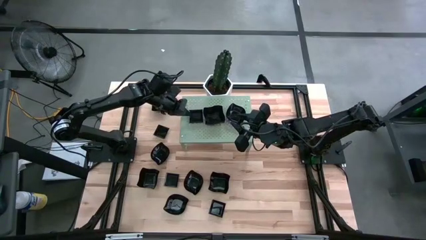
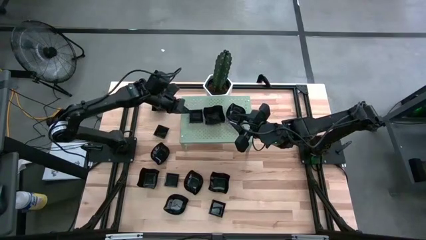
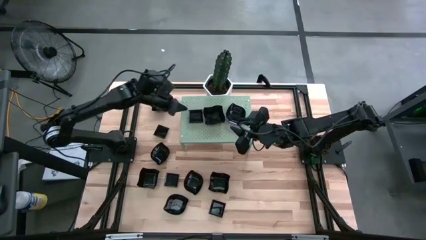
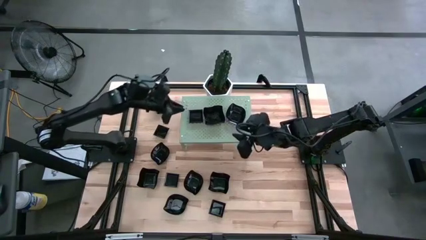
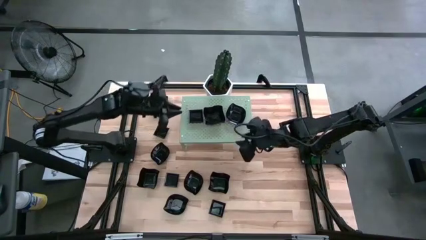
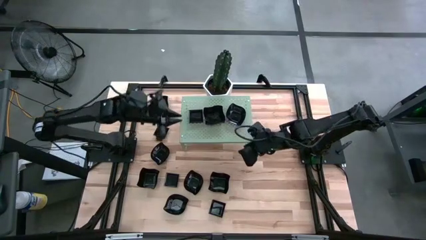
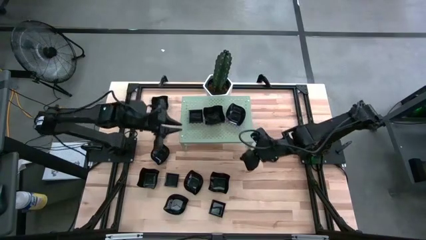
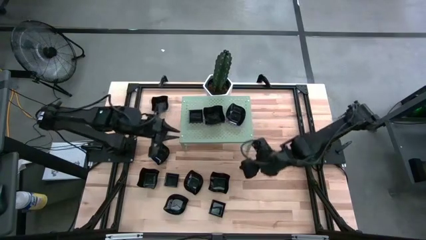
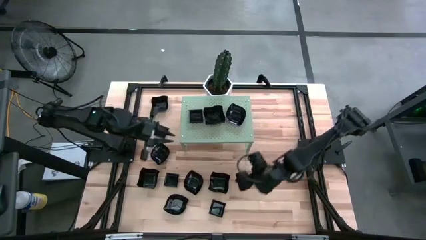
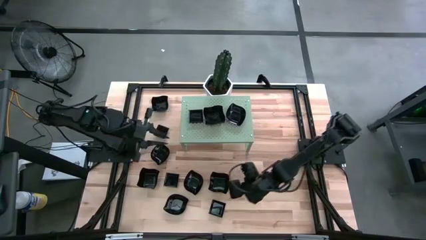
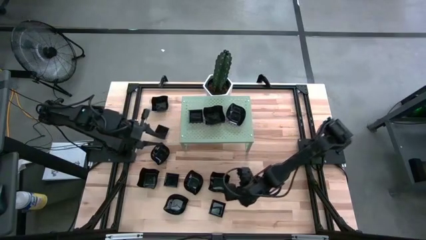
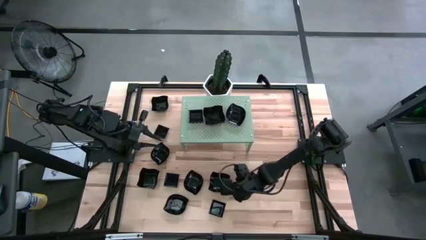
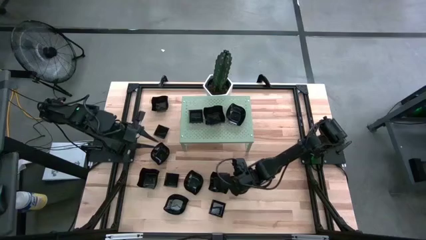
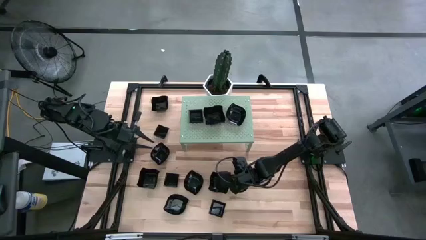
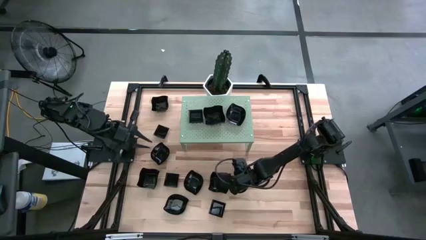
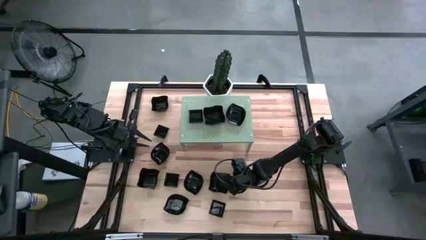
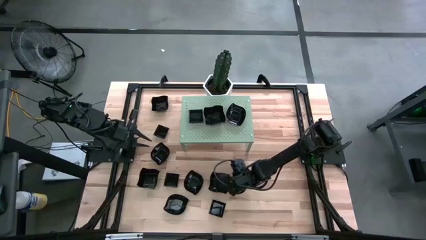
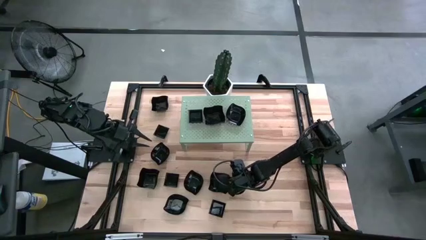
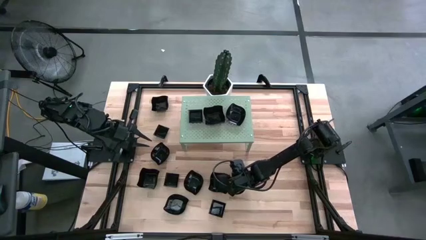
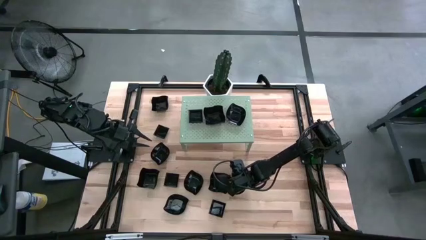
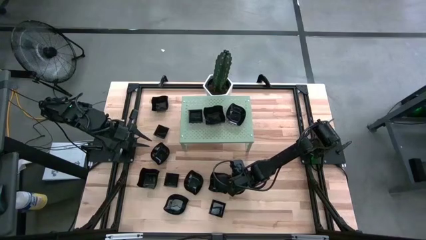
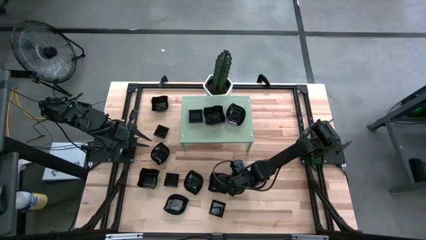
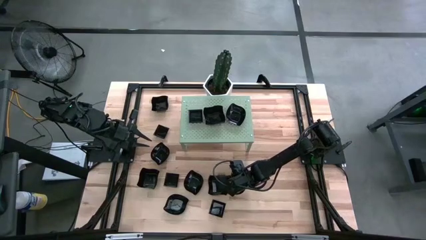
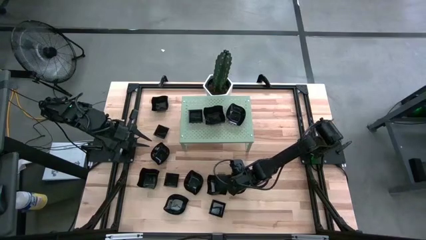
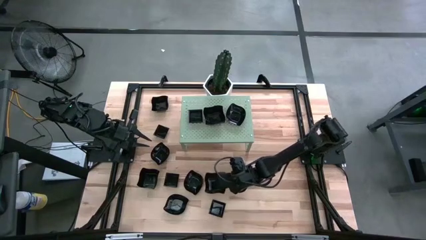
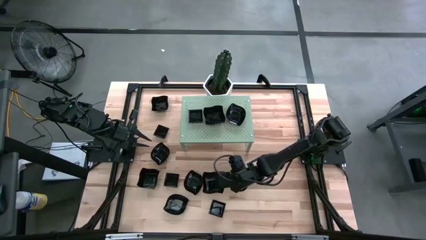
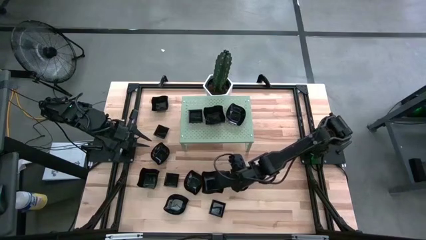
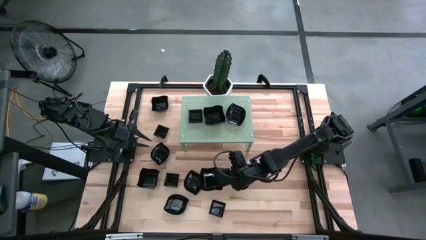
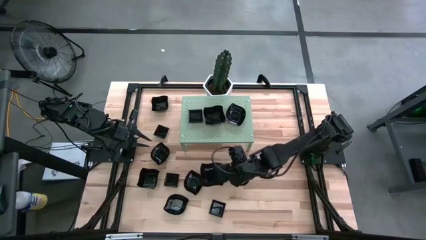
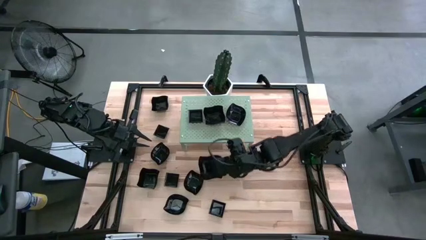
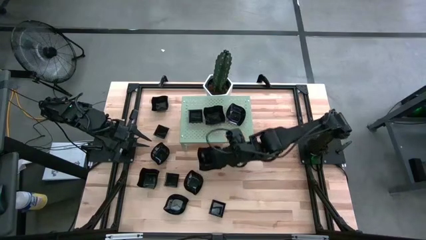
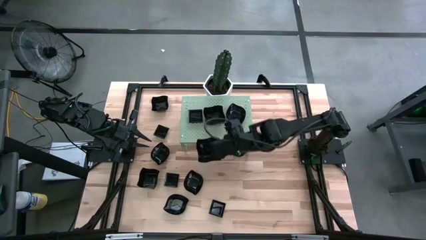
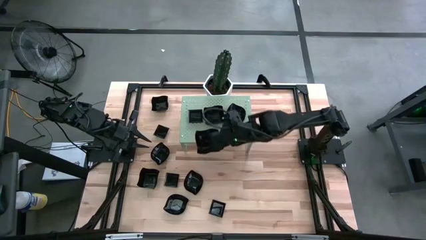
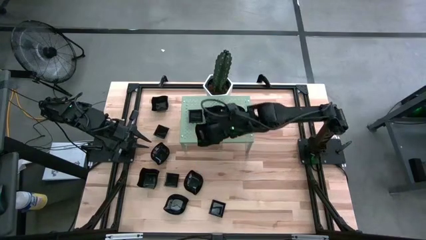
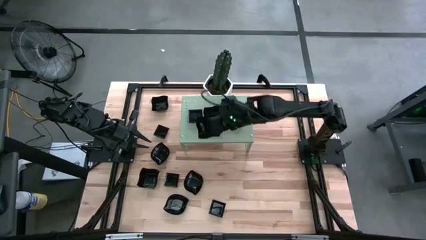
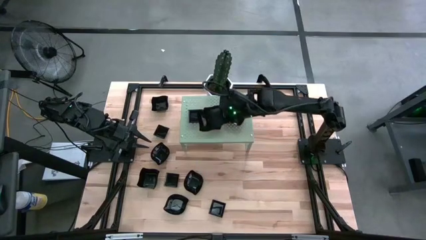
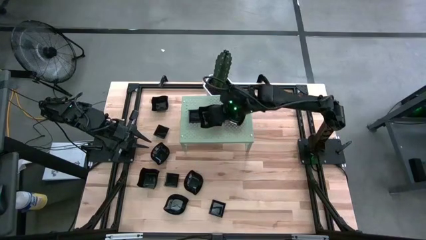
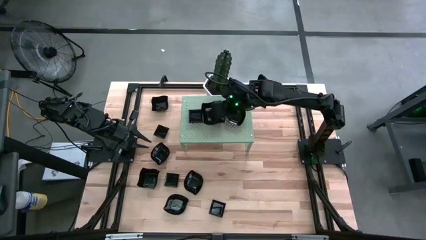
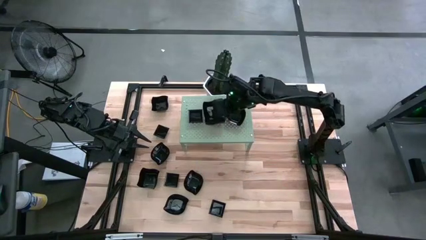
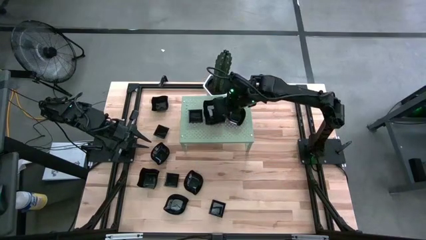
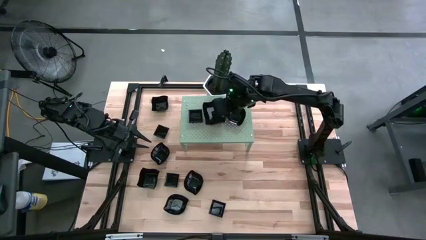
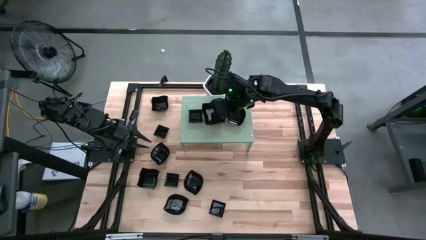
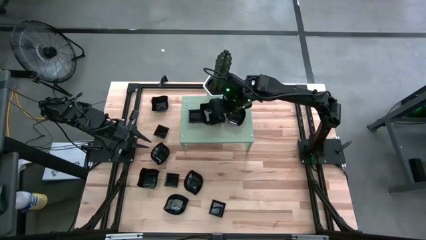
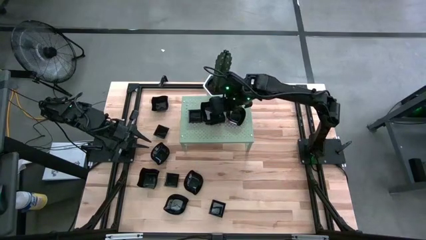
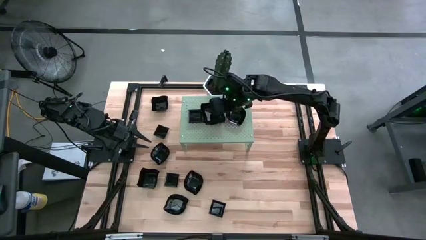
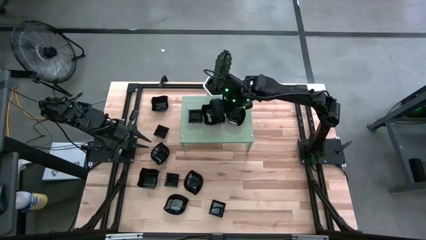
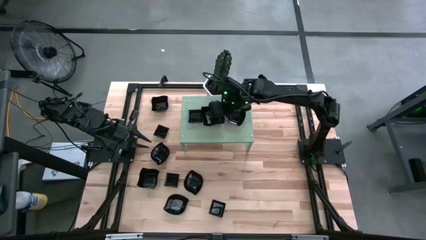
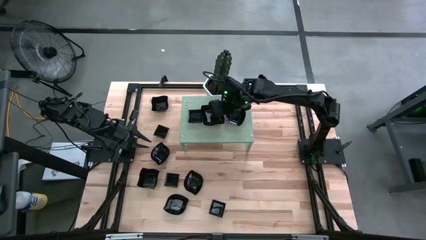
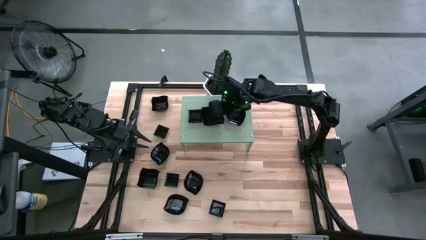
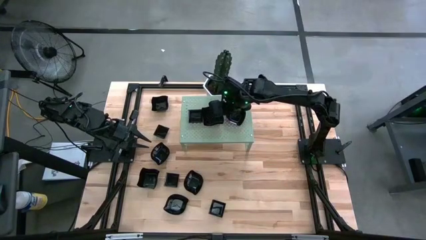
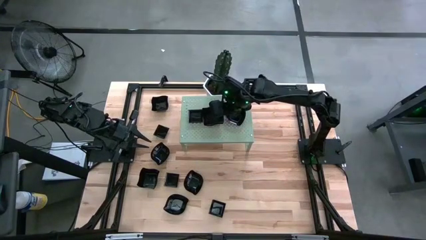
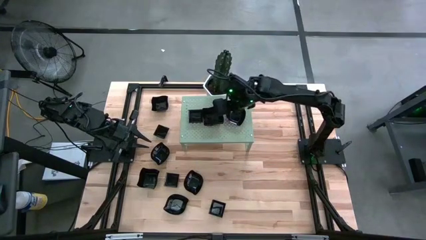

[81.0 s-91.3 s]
Task: Pick & Place Mini shaped plates
Stack the distorted square plate on top of the distorted square plates on the shelf

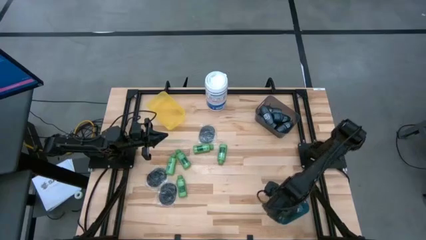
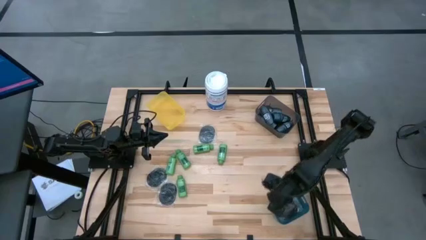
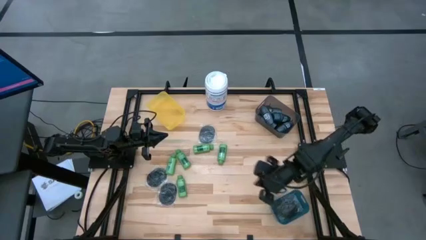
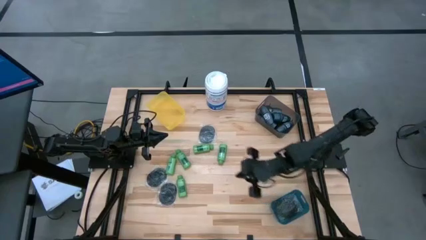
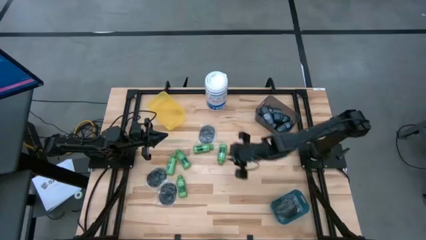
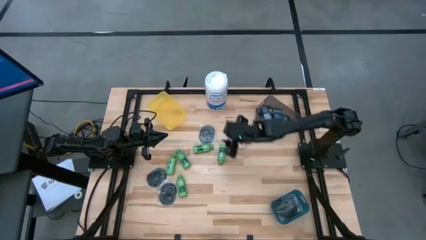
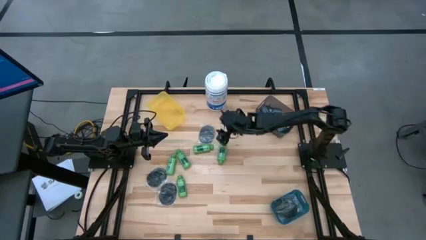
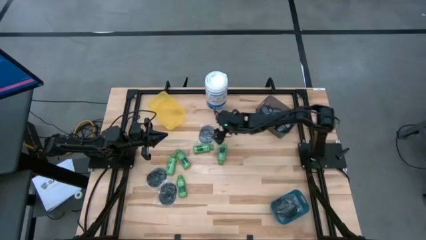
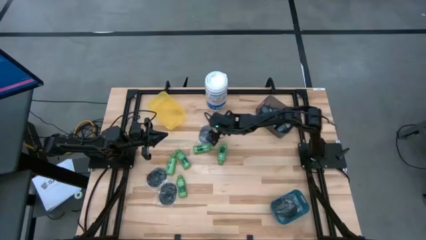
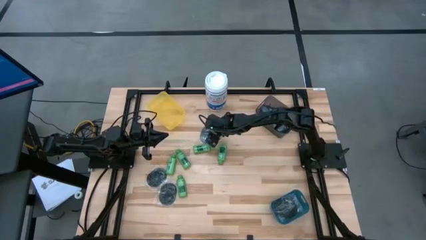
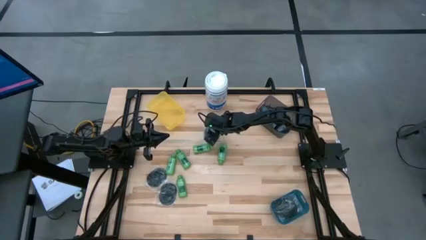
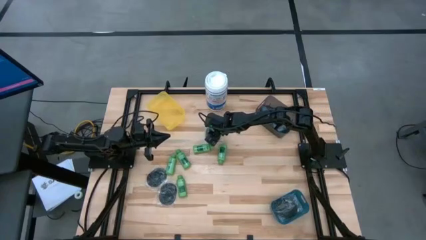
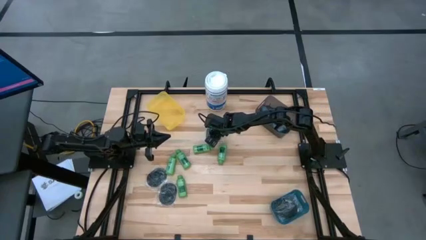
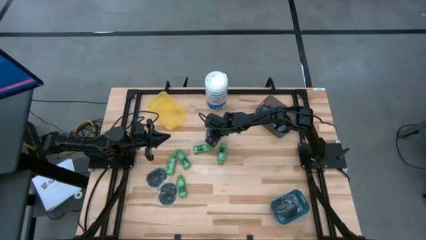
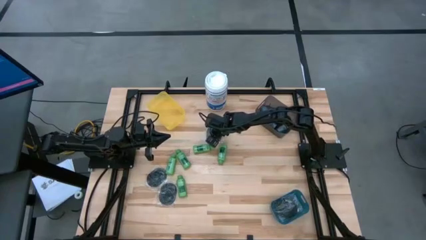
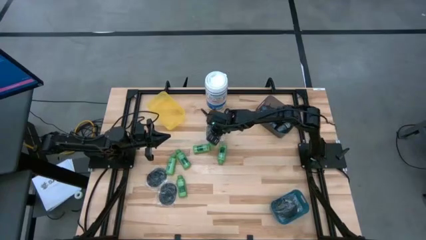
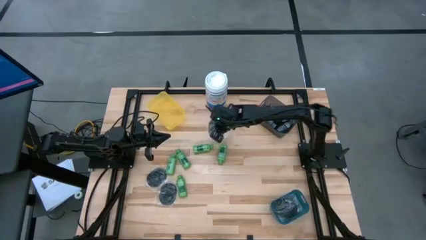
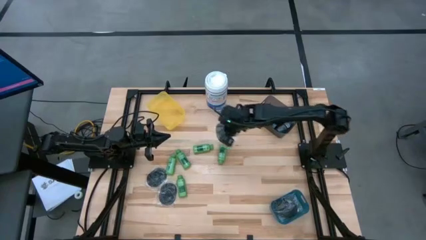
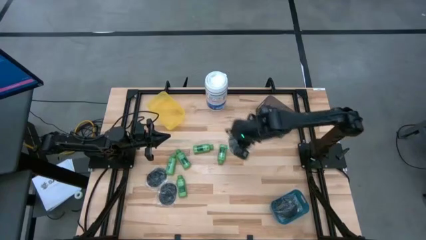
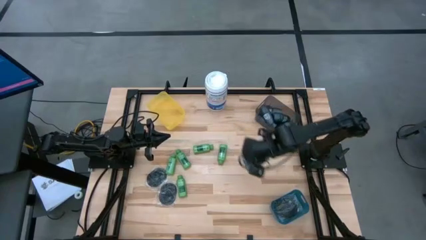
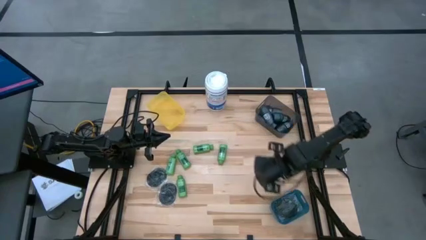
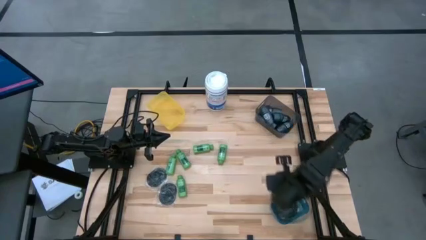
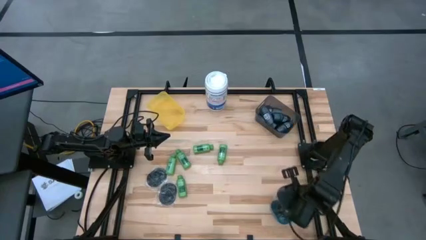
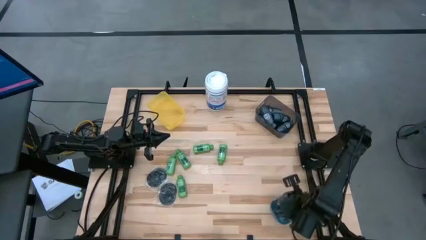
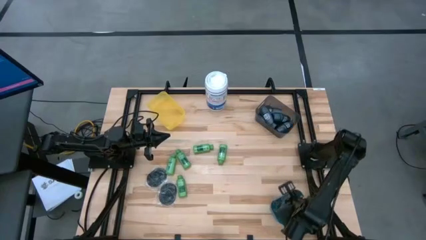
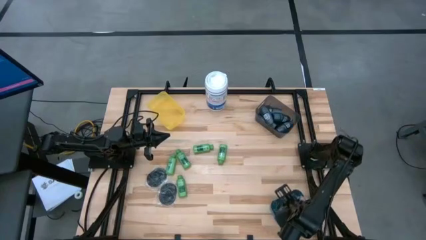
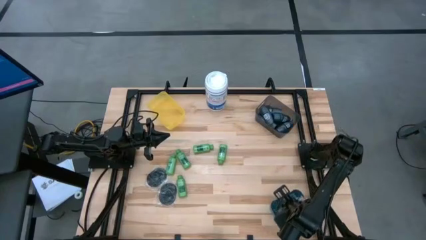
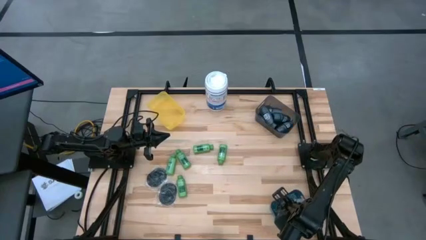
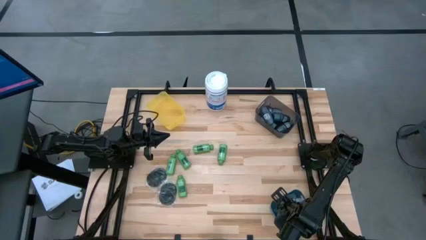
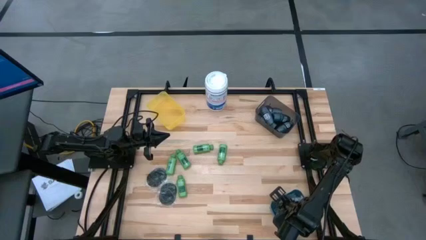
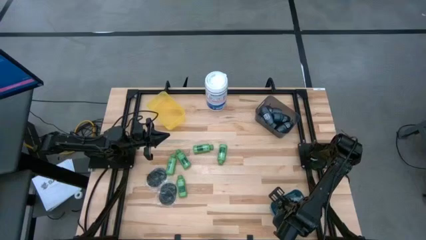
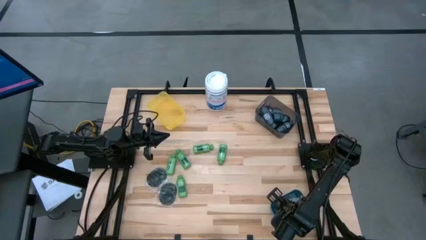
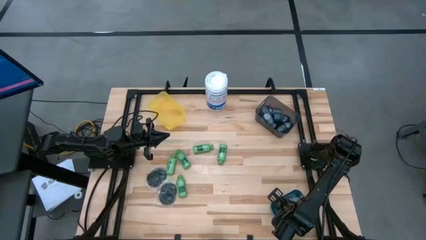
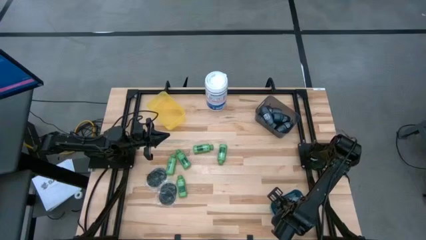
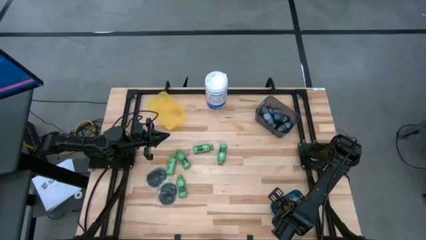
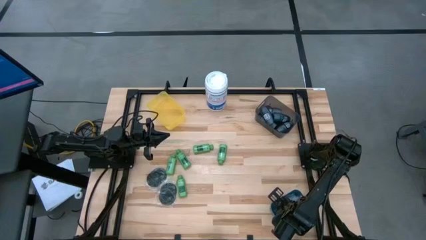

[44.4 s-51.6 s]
Task: Pick & Place Travel size toiletries
Put the black hairbrush into the blue bin
